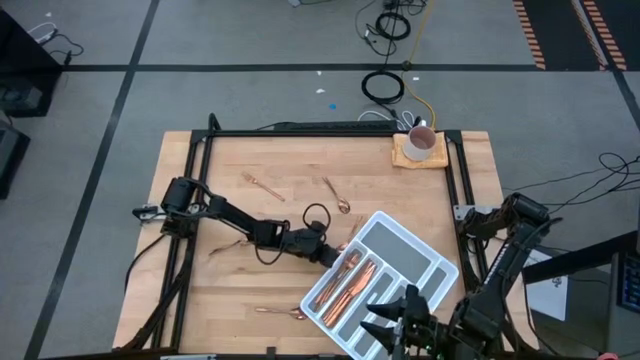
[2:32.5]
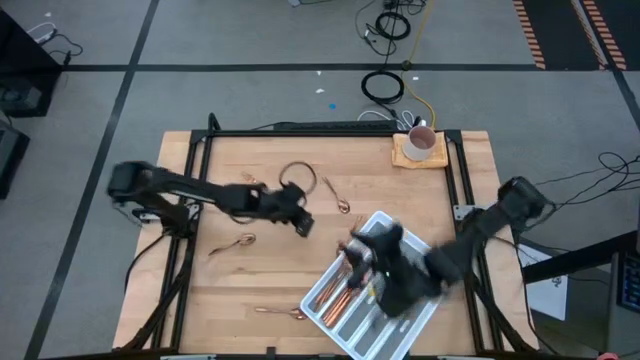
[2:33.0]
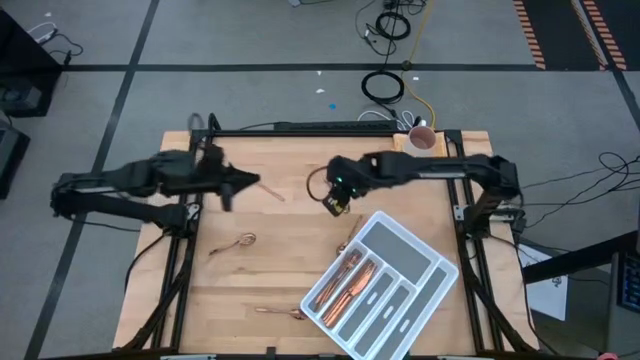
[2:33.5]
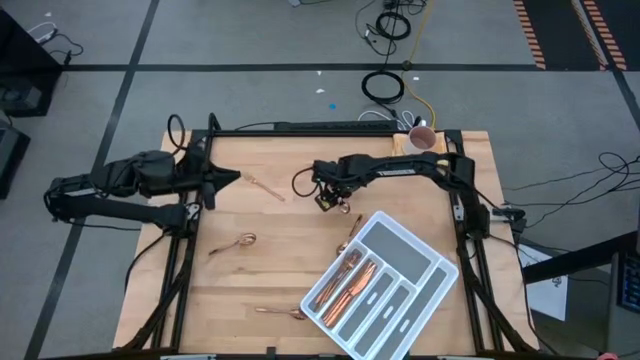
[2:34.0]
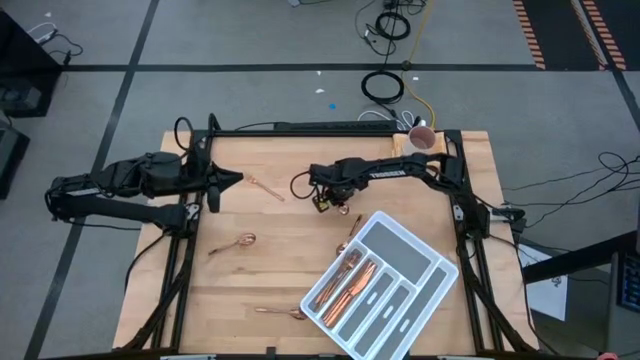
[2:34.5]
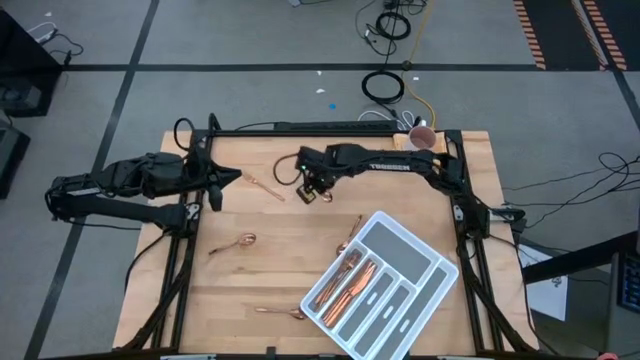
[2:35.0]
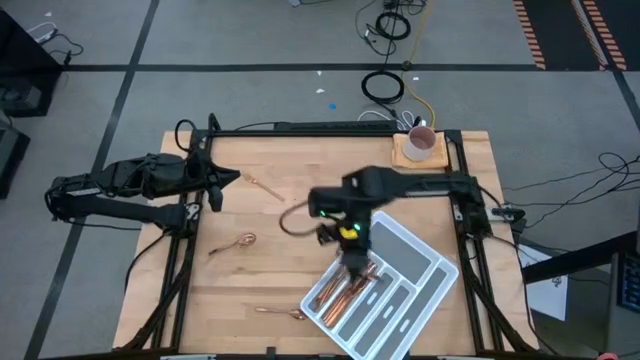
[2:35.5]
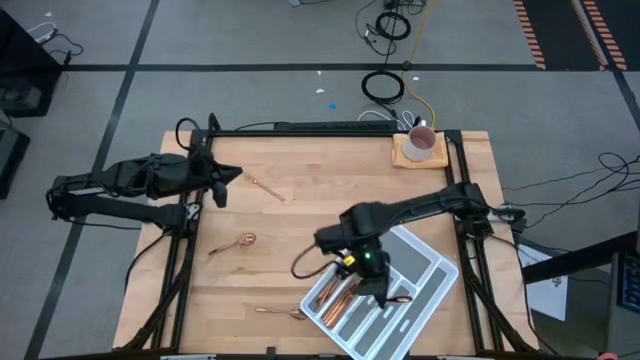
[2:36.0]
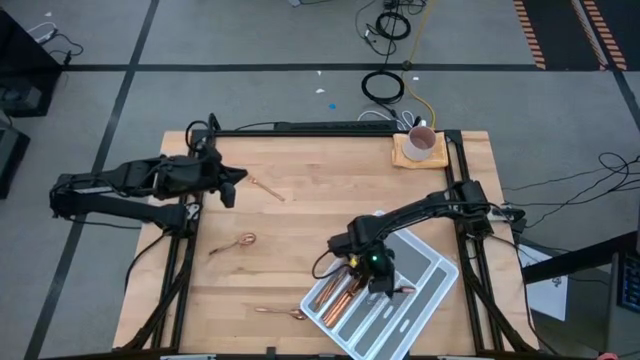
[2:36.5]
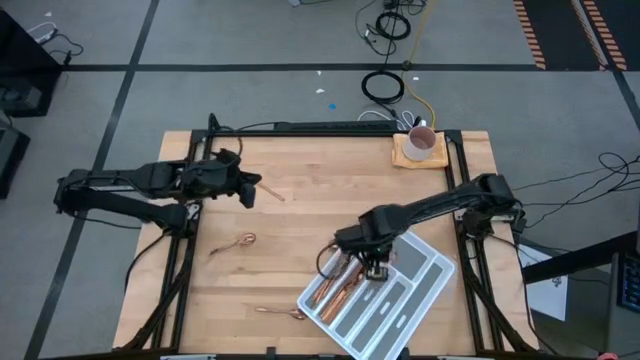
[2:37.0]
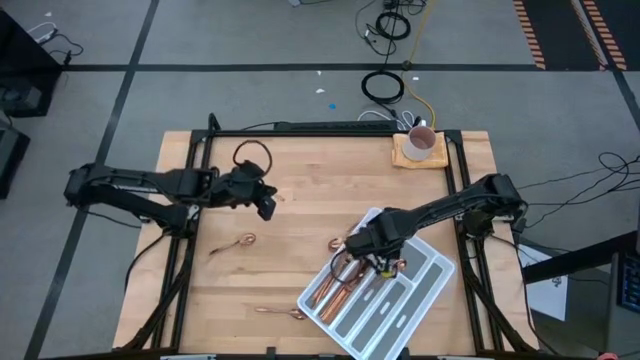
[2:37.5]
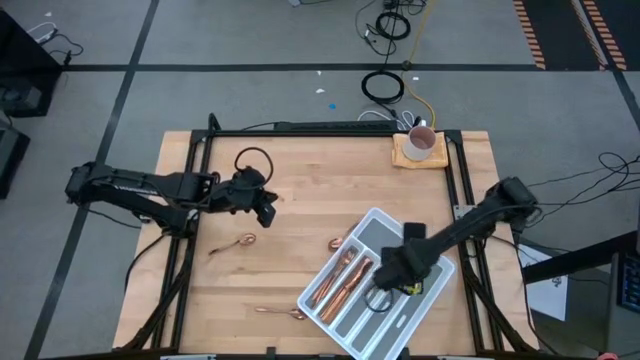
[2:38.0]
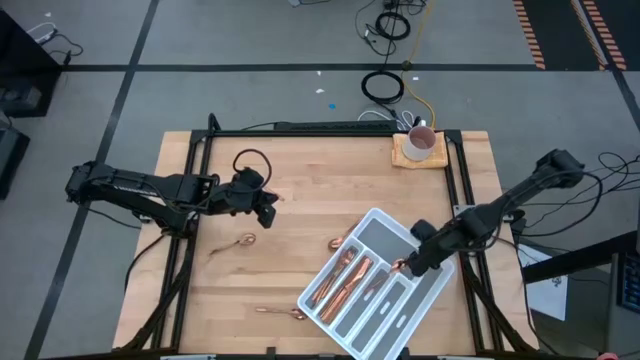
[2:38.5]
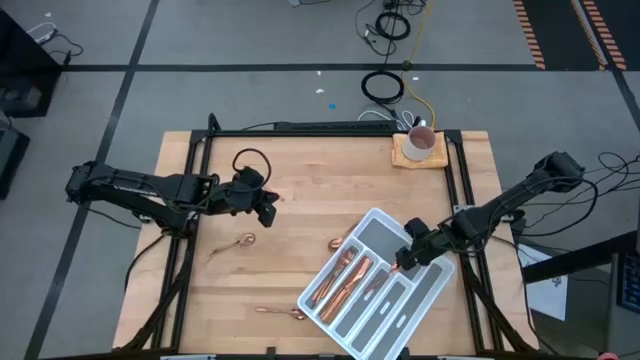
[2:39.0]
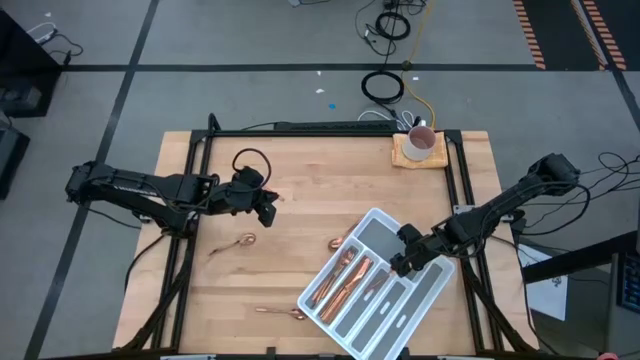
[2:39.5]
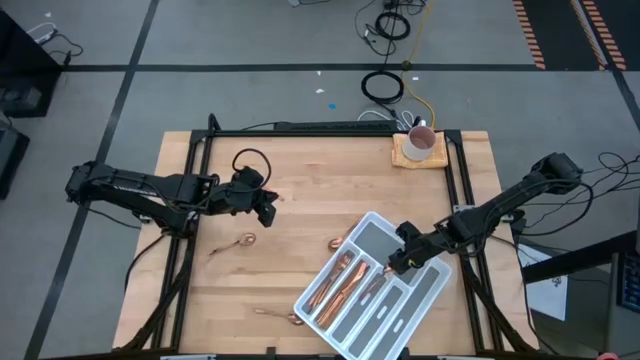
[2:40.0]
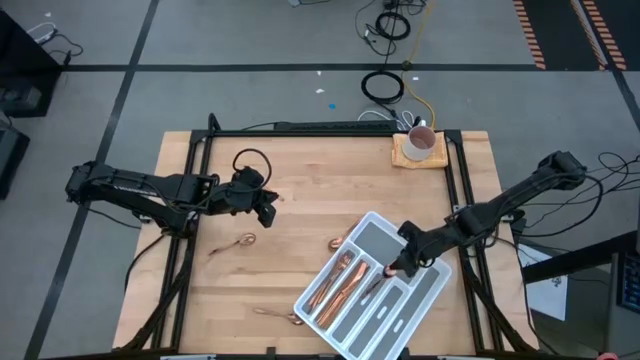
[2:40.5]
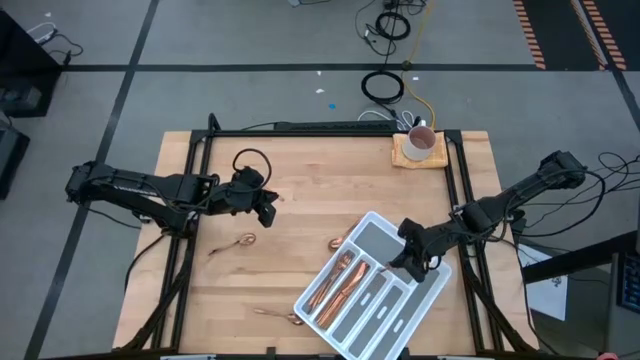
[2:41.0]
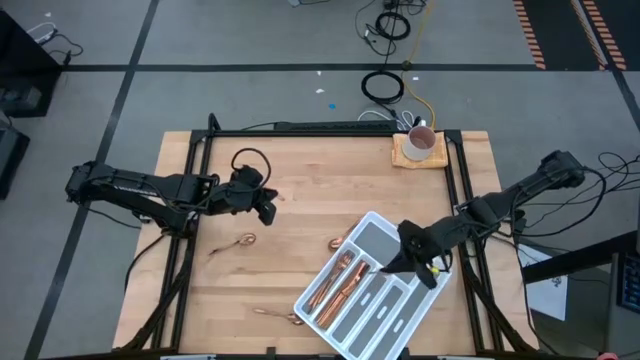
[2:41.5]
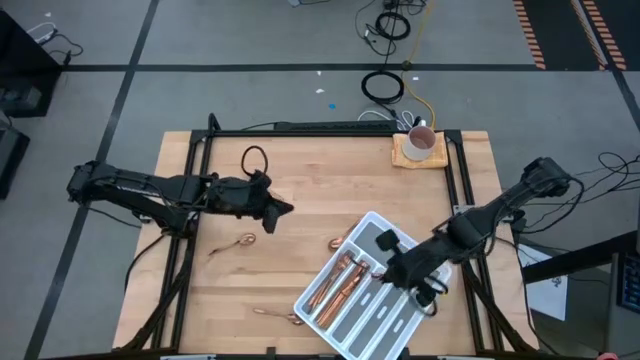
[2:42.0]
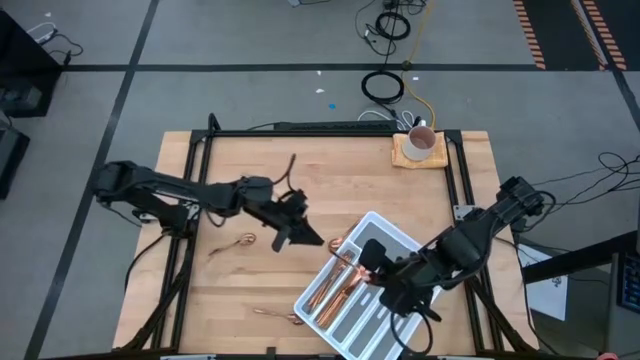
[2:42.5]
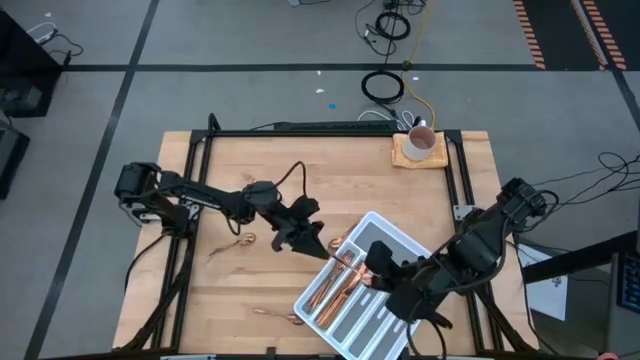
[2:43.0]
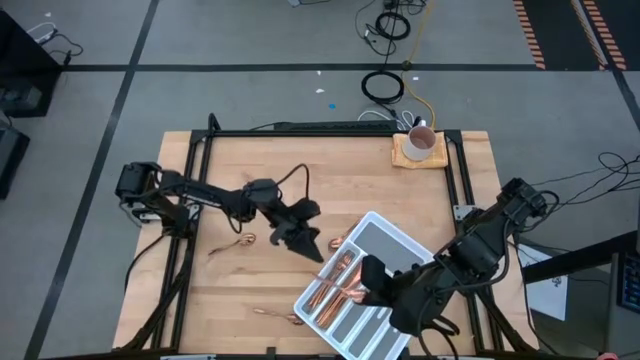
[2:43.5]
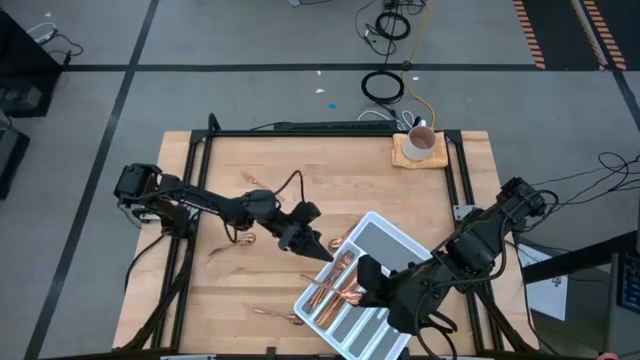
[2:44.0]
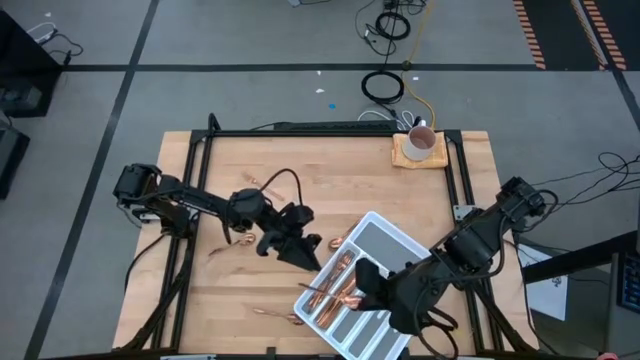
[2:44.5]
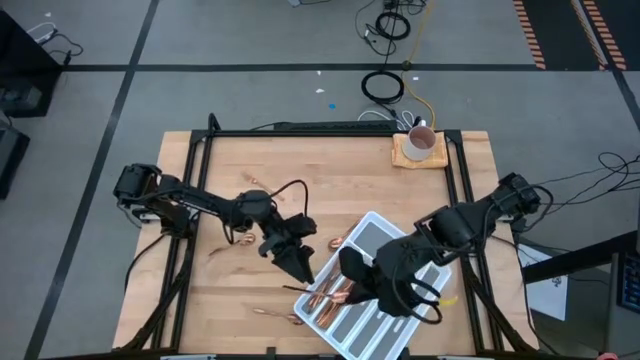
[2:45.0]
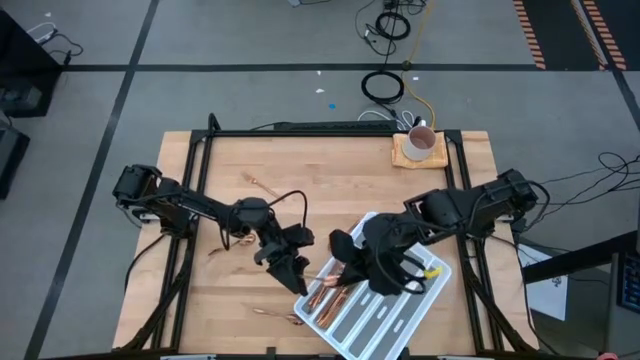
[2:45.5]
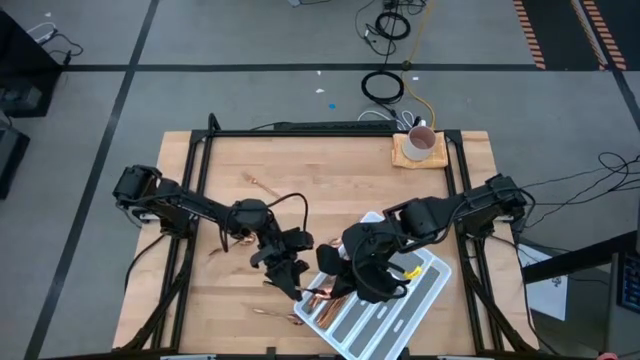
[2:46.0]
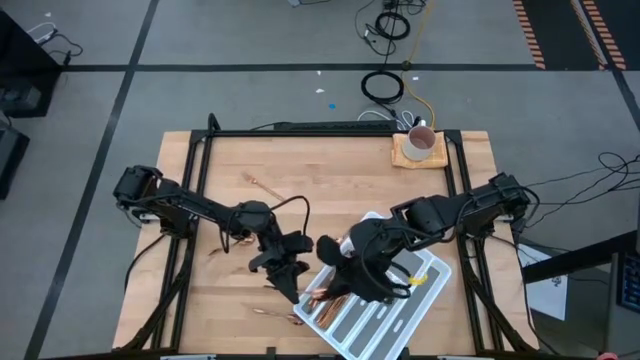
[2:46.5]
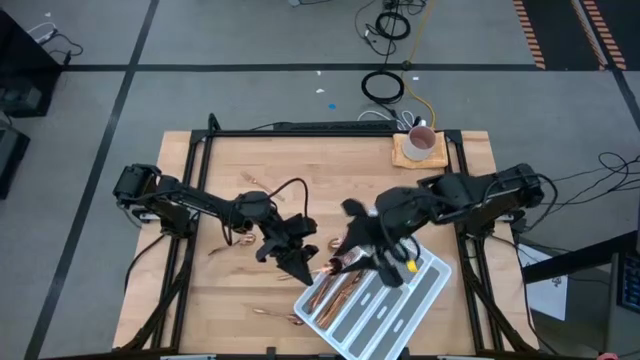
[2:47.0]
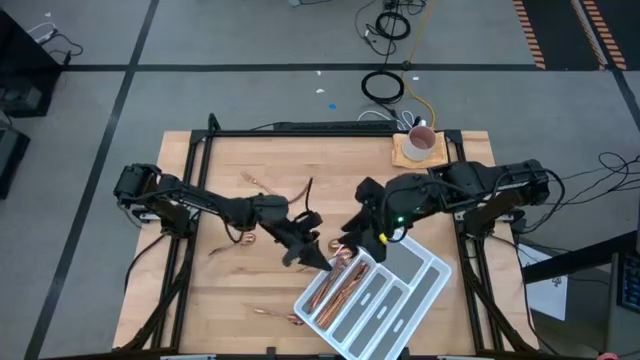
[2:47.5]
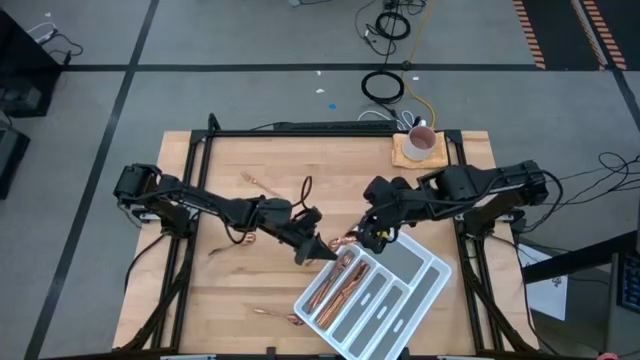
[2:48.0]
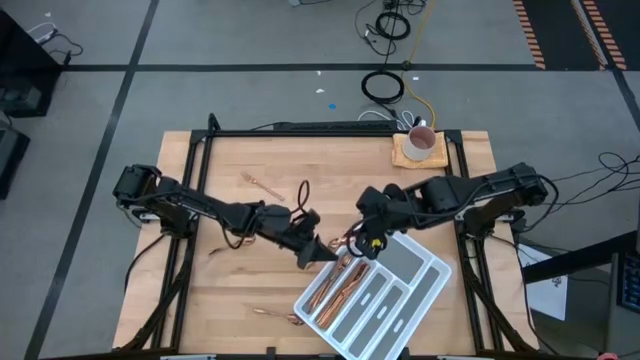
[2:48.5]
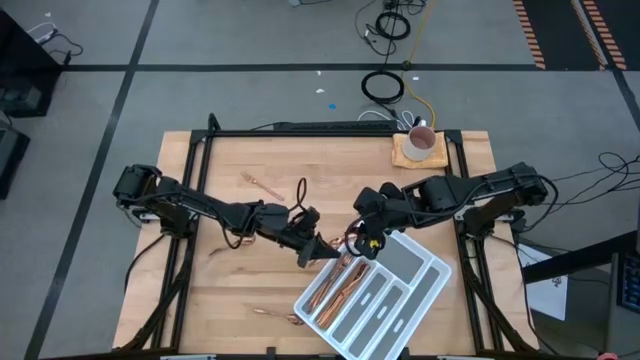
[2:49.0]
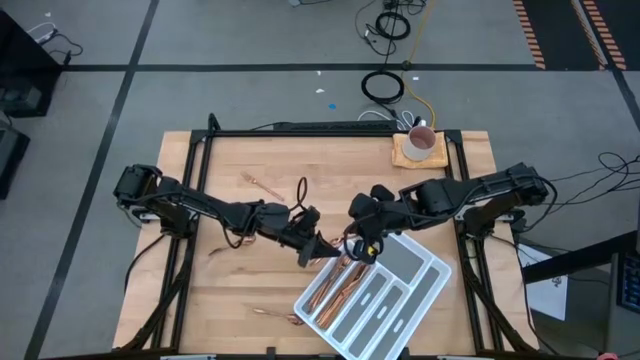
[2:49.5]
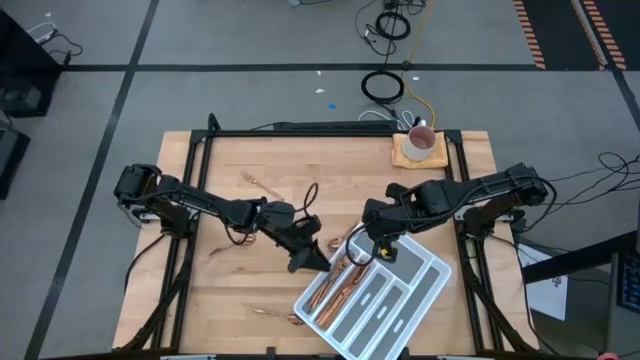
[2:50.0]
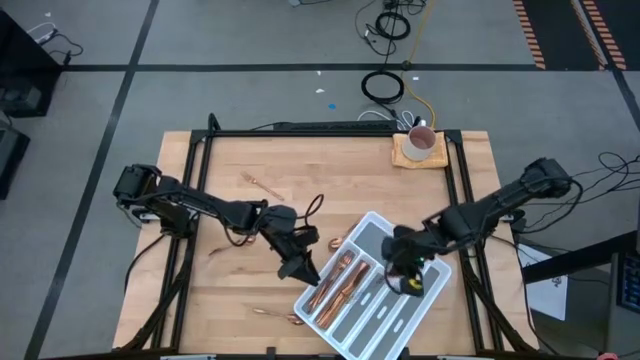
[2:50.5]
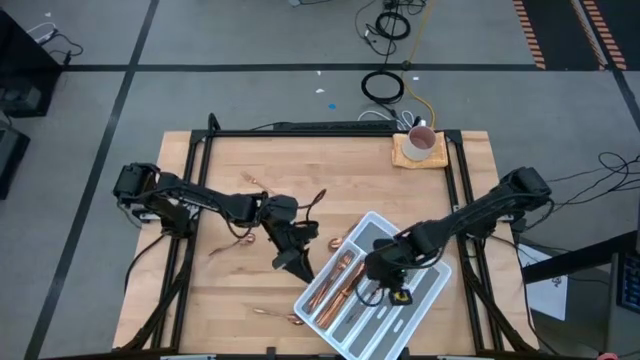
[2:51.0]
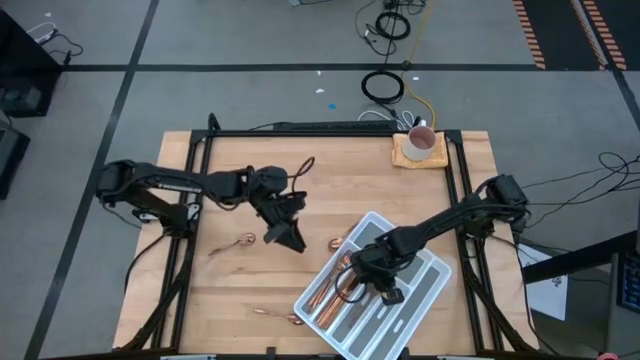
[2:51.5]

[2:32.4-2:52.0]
Task: Sort silverware
Put the gold spoon into the silverware tray
